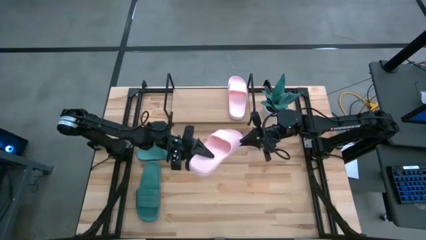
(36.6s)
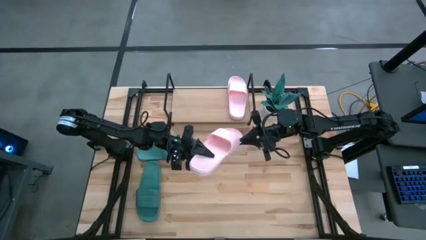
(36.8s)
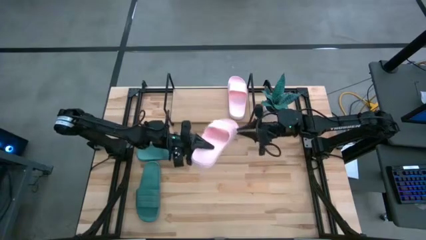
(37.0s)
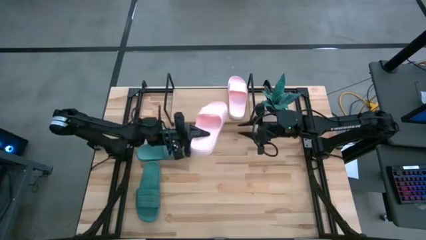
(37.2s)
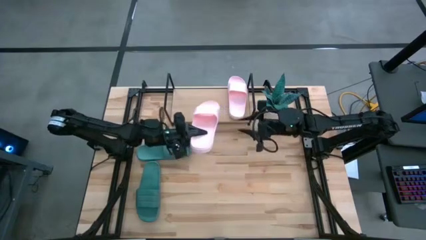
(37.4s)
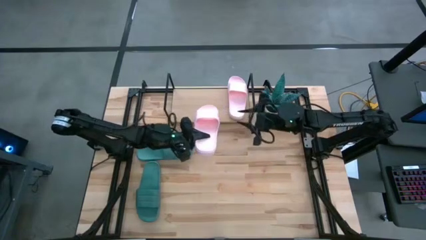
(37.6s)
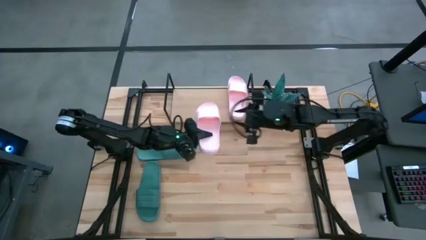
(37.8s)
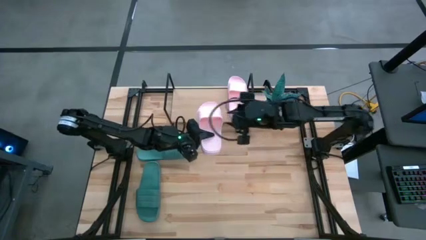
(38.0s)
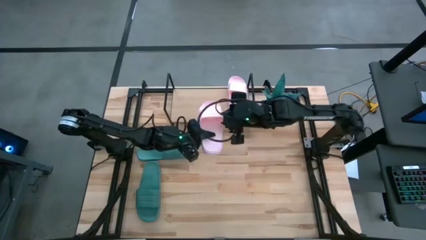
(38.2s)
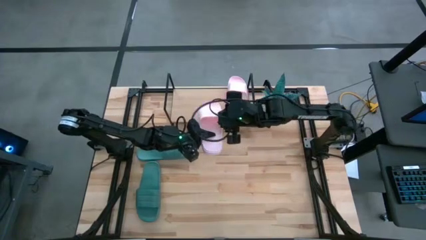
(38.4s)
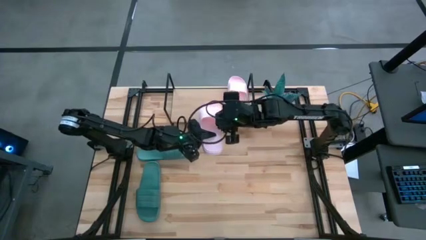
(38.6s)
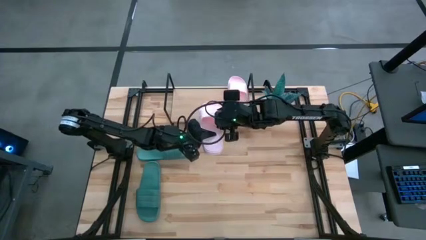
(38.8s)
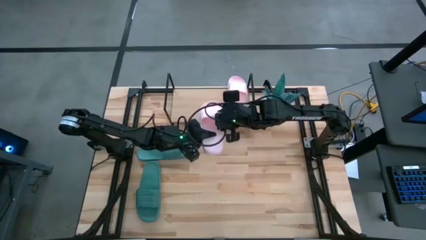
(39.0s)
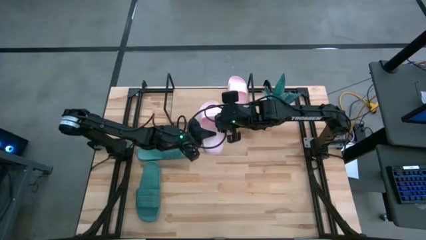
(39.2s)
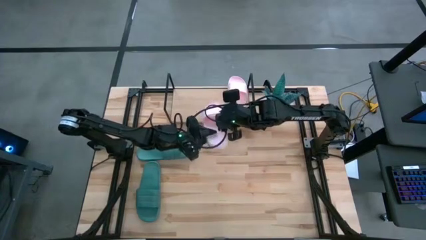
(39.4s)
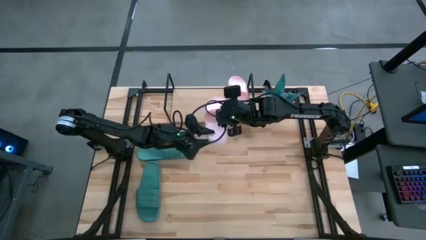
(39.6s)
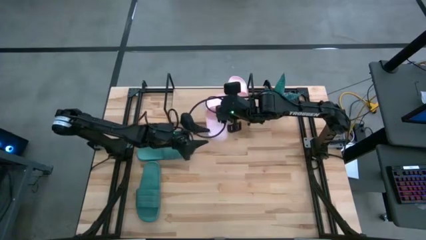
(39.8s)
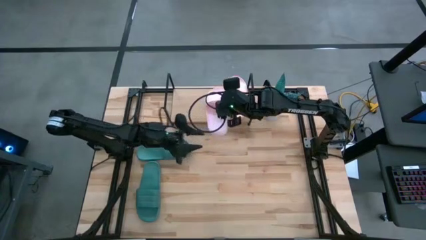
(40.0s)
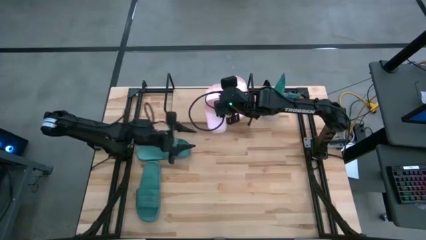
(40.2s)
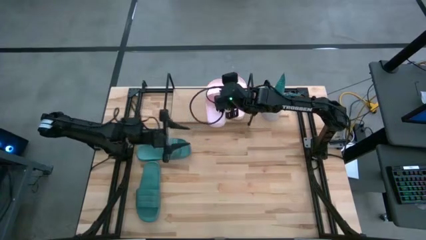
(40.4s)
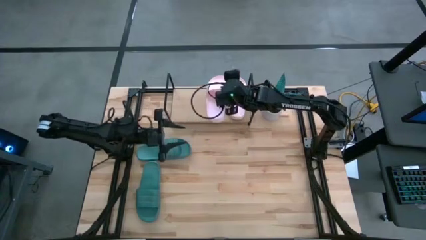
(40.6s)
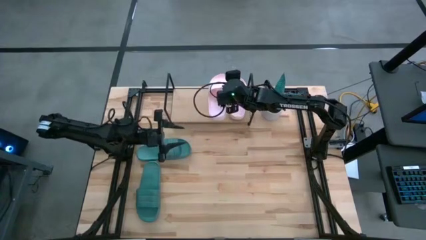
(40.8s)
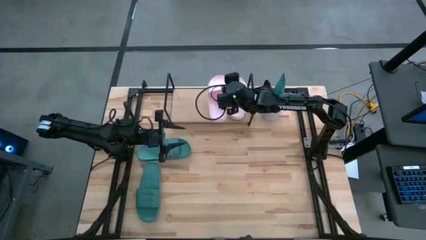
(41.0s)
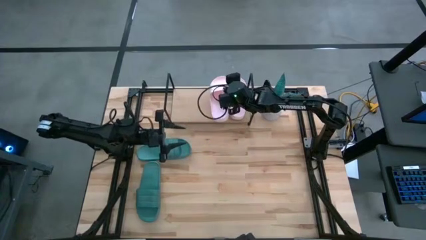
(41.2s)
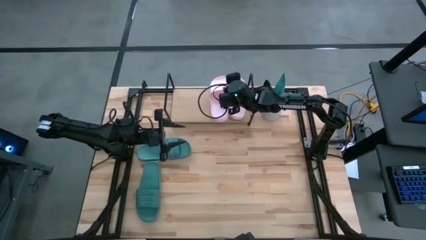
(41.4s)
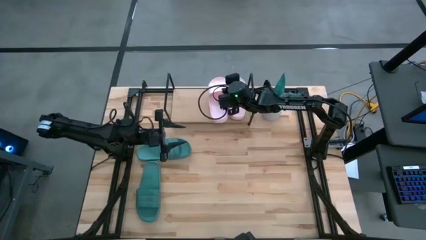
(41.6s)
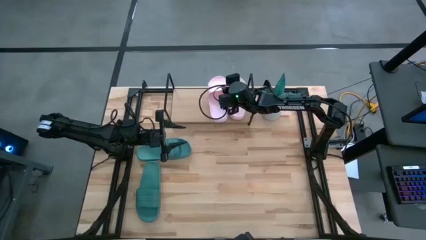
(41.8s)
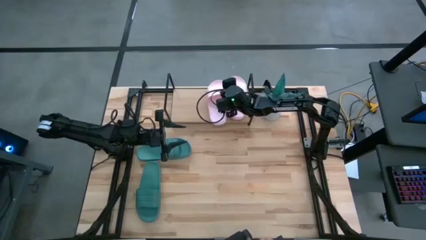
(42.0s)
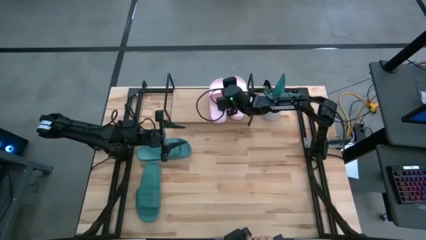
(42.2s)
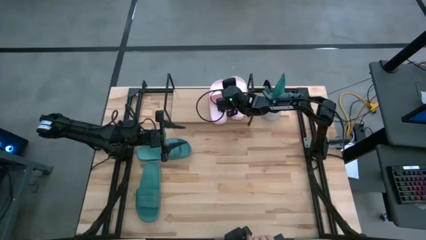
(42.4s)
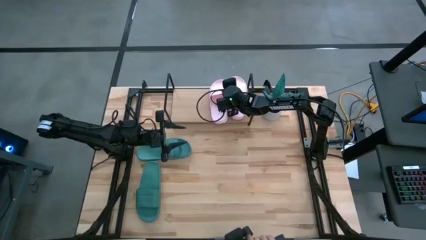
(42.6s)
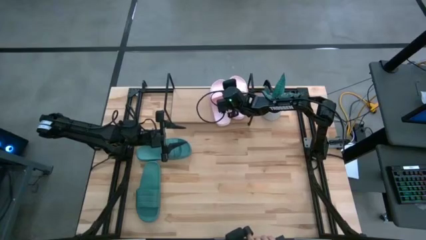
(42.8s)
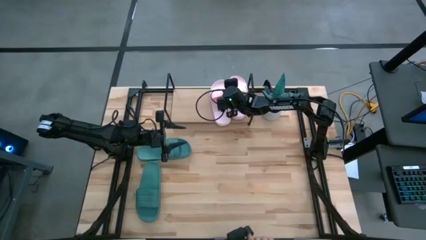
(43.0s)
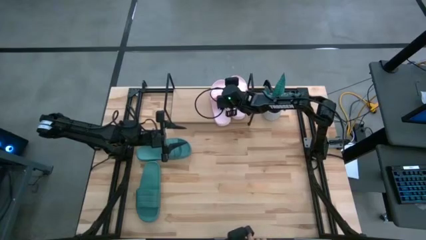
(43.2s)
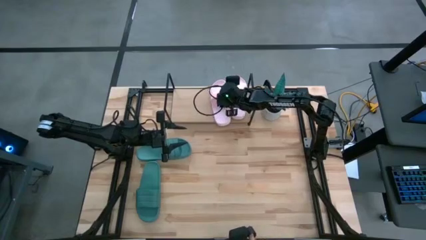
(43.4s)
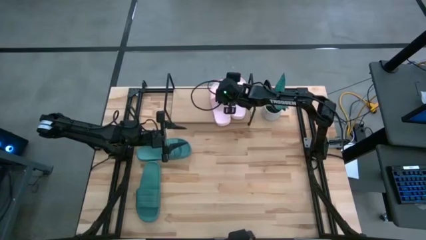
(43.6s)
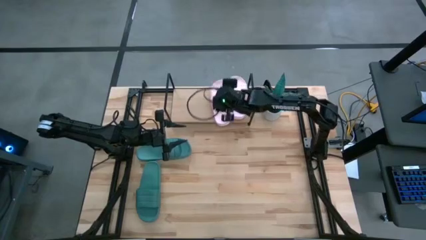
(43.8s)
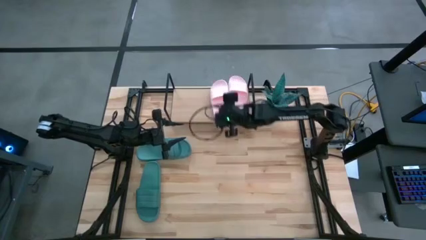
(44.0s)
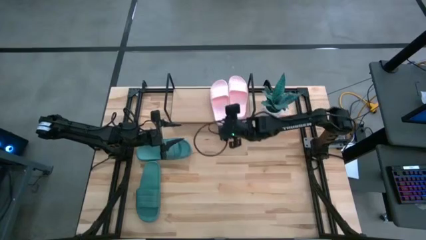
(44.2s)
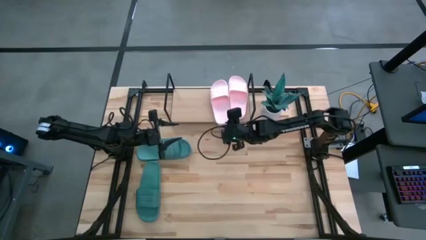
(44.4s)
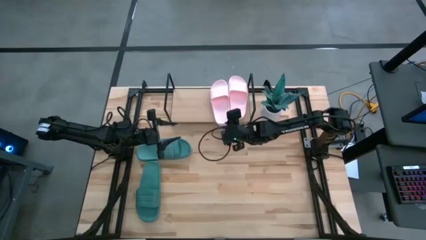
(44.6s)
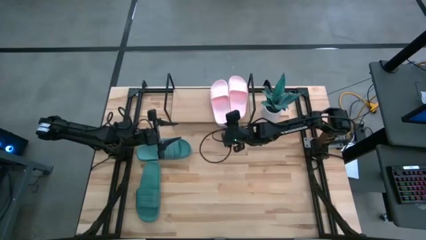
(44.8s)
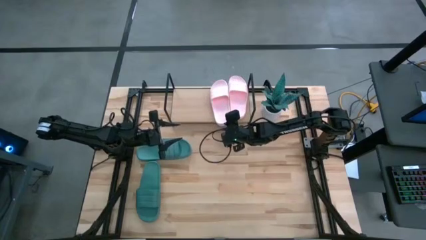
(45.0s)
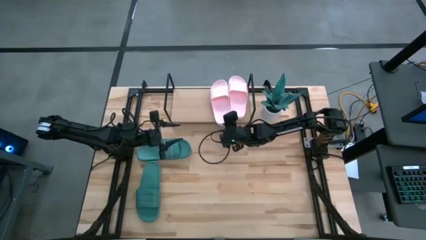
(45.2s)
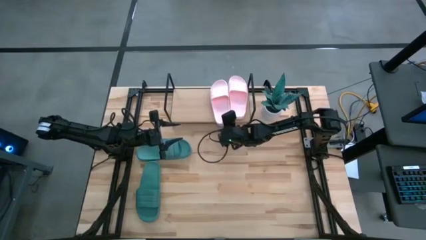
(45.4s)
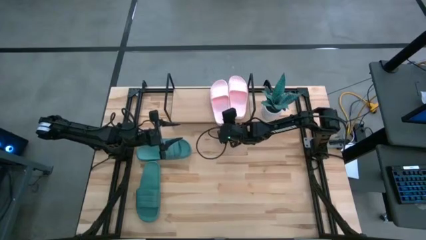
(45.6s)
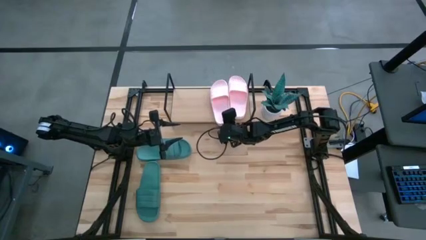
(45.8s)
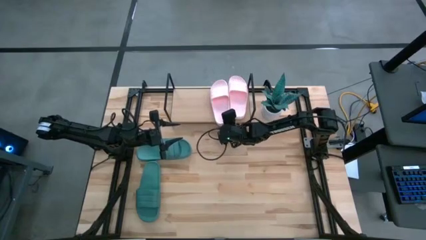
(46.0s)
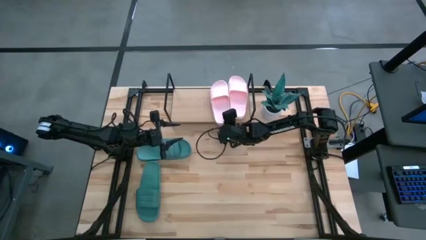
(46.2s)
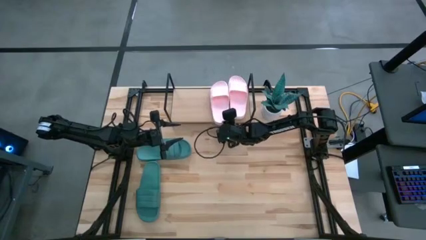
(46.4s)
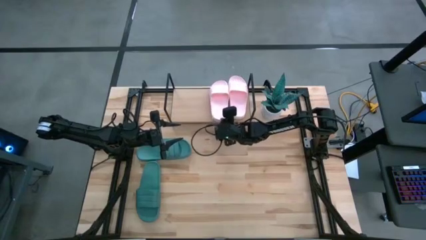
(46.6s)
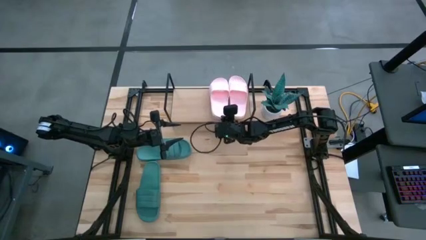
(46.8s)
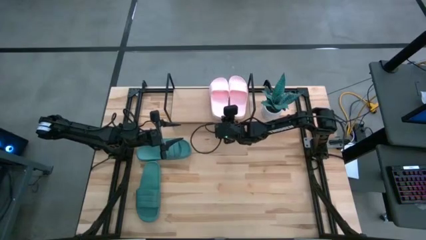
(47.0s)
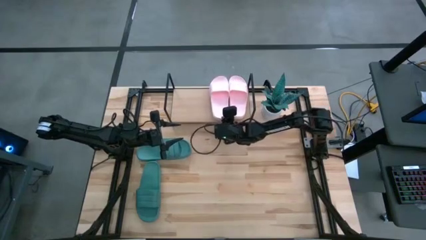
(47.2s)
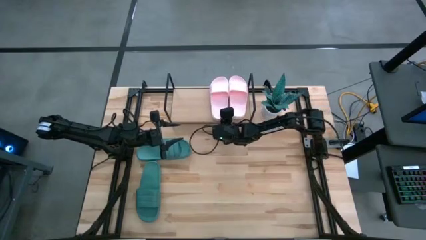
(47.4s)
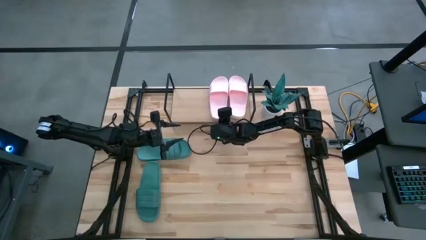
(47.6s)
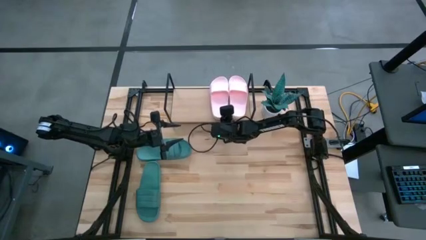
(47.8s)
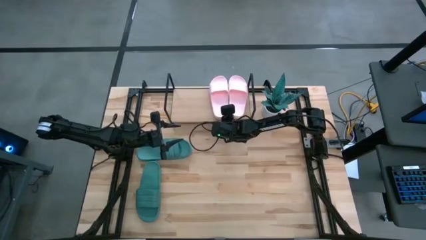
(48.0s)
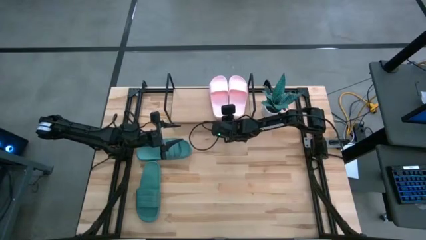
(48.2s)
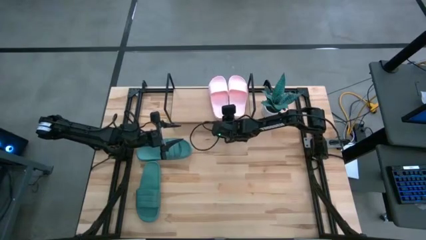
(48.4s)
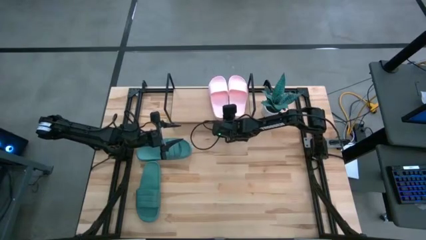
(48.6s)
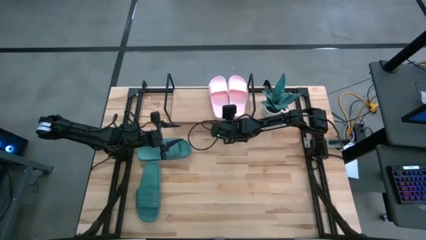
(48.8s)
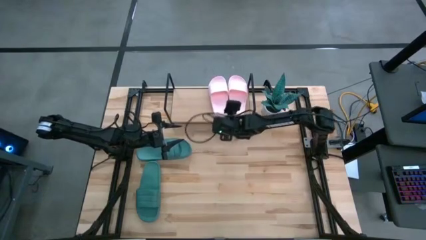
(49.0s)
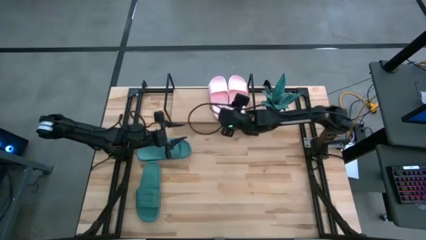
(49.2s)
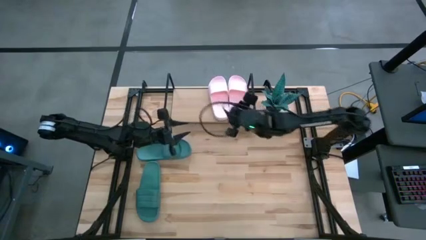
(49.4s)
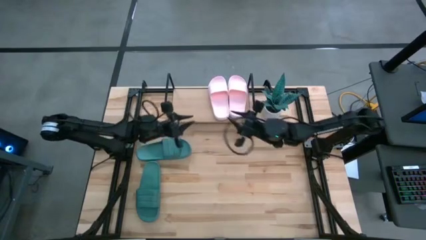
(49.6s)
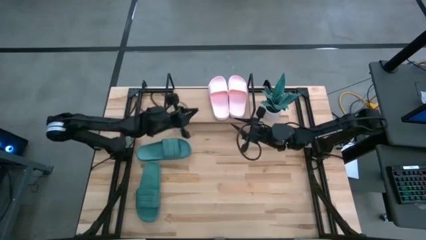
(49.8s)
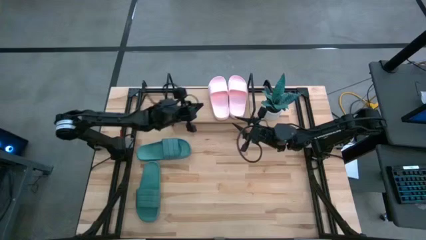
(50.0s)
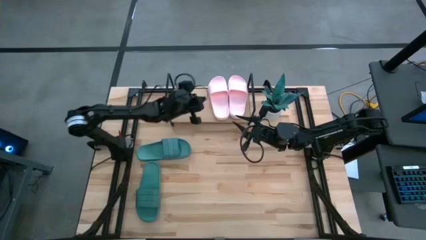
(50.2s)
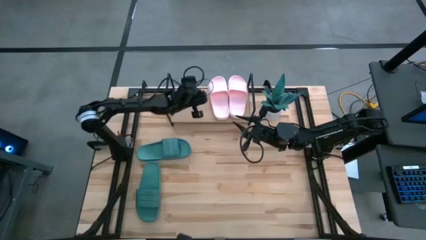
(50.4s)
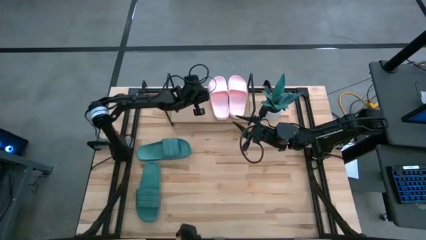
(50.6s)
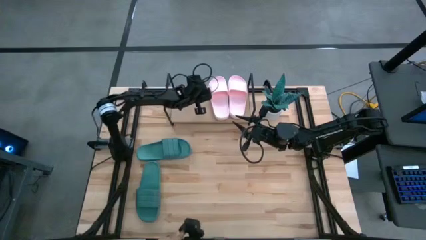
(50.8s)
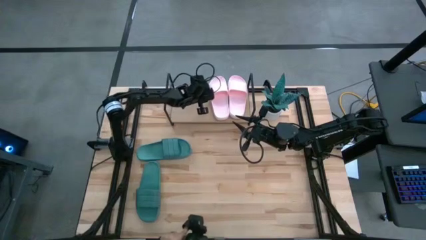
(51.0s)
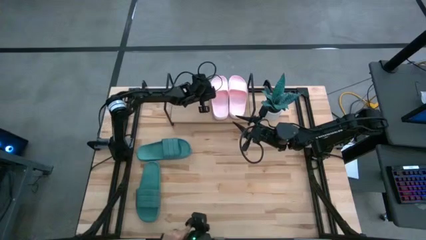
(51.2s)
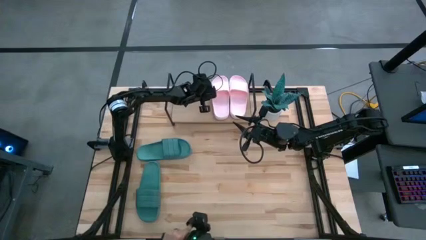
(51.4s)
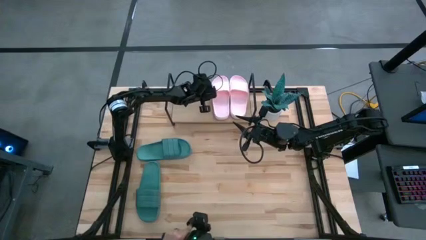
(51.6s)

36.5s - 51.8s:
Task: Pick and place slides into the shelf
Put the pink slipper on the shelf
